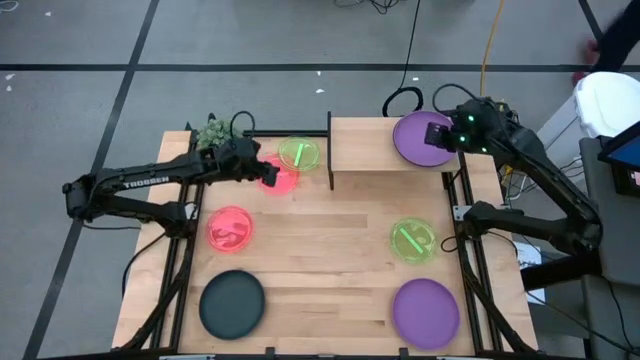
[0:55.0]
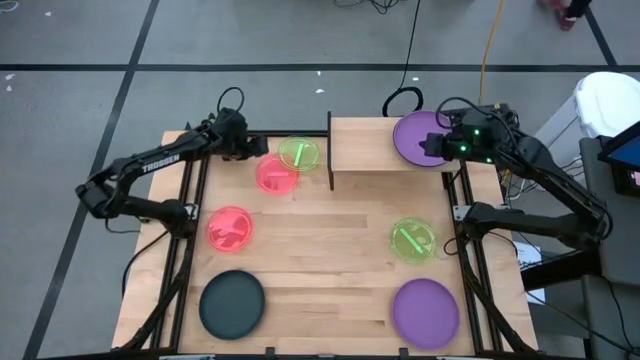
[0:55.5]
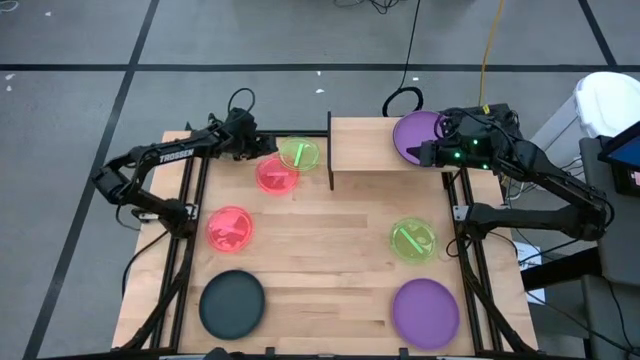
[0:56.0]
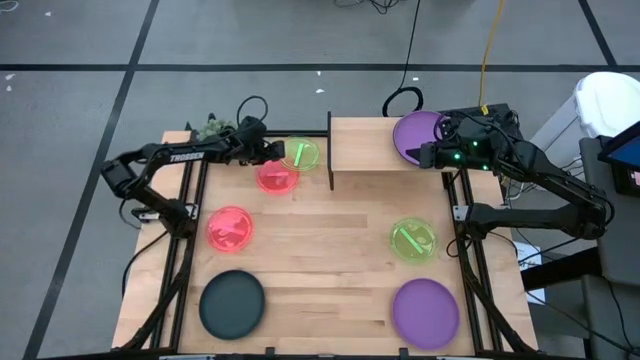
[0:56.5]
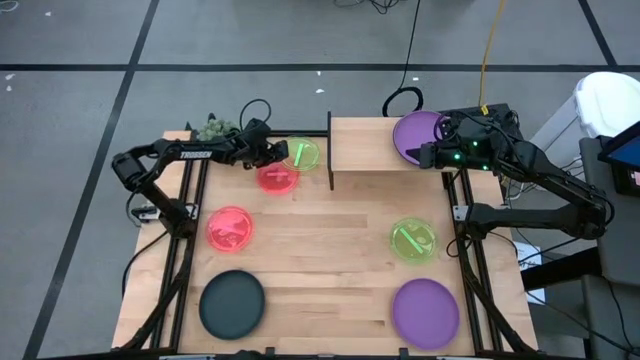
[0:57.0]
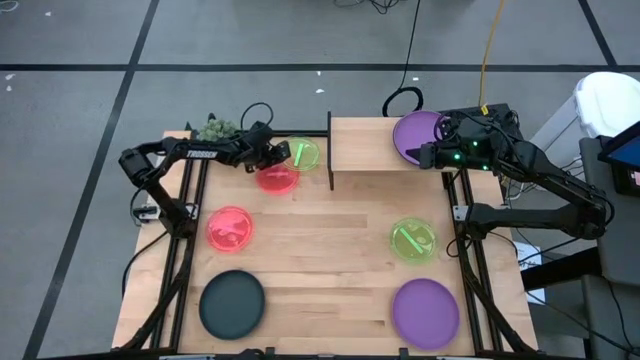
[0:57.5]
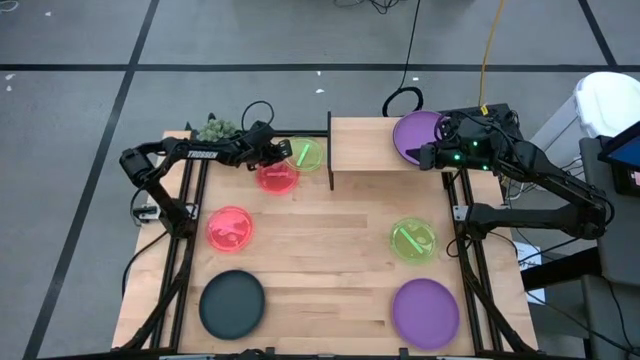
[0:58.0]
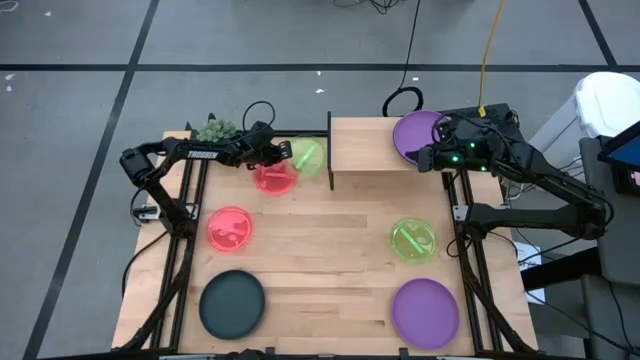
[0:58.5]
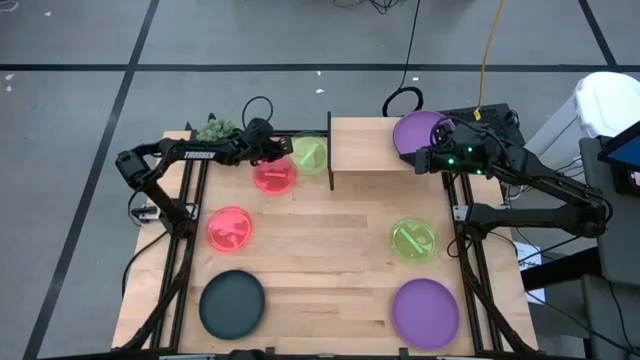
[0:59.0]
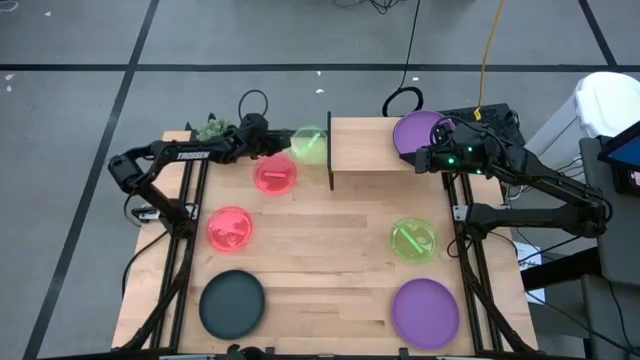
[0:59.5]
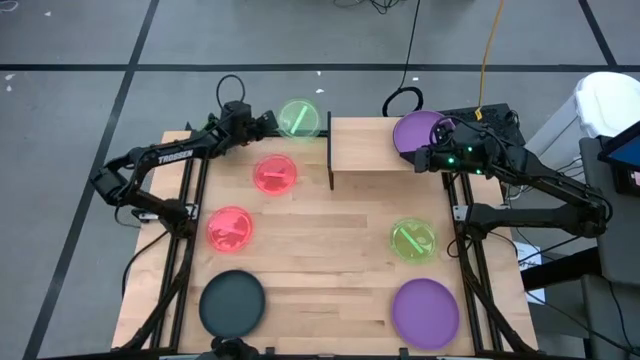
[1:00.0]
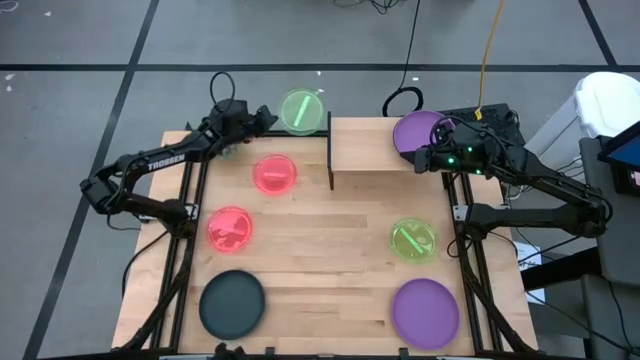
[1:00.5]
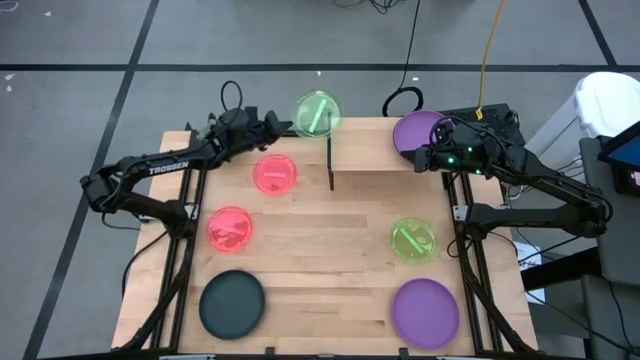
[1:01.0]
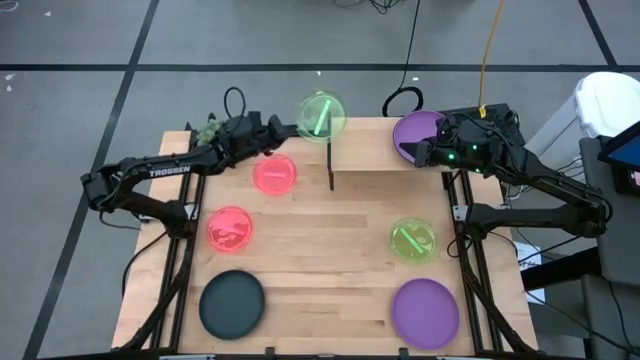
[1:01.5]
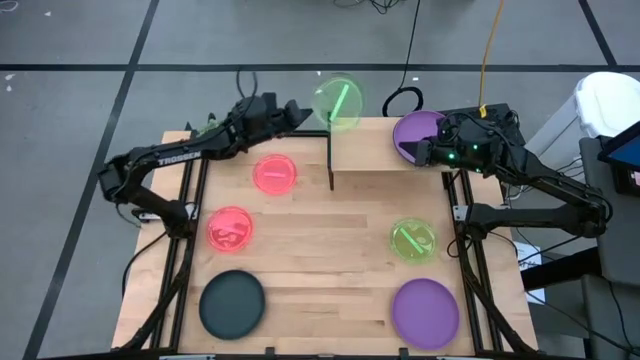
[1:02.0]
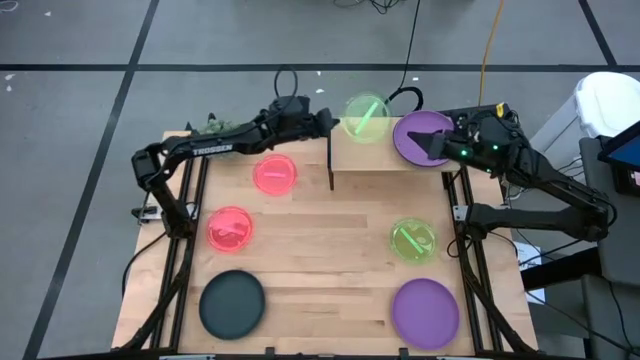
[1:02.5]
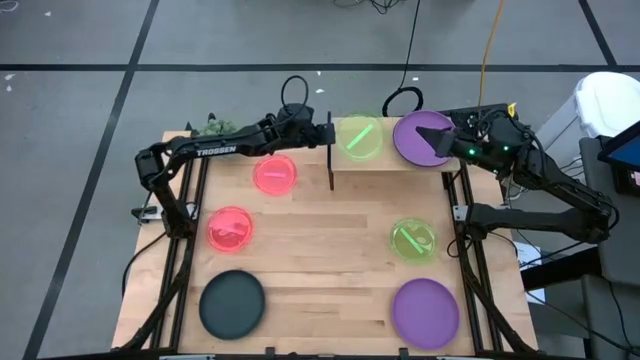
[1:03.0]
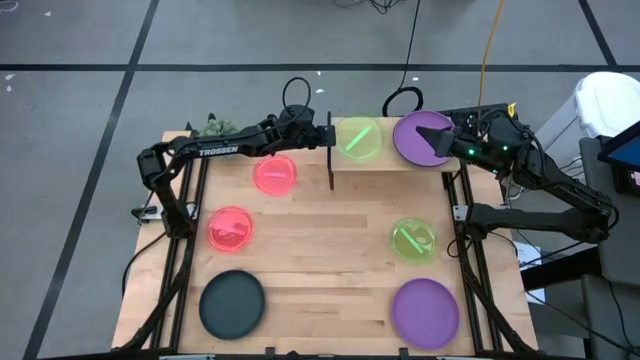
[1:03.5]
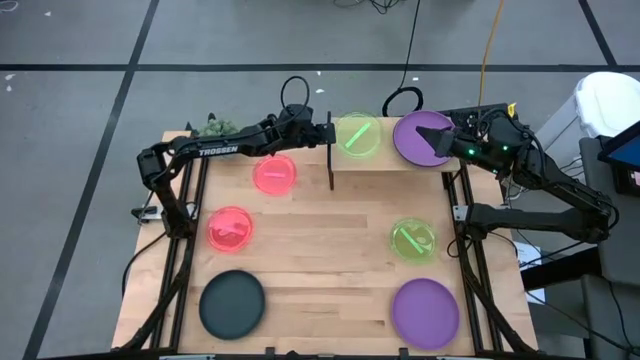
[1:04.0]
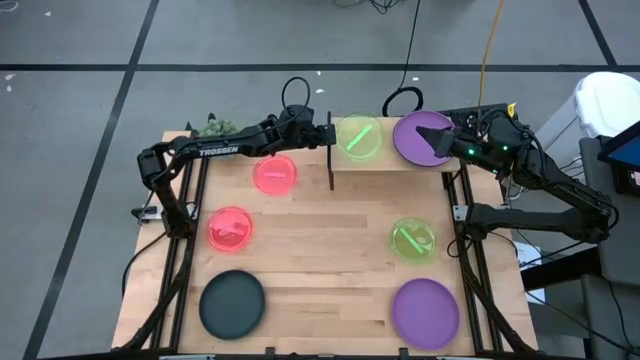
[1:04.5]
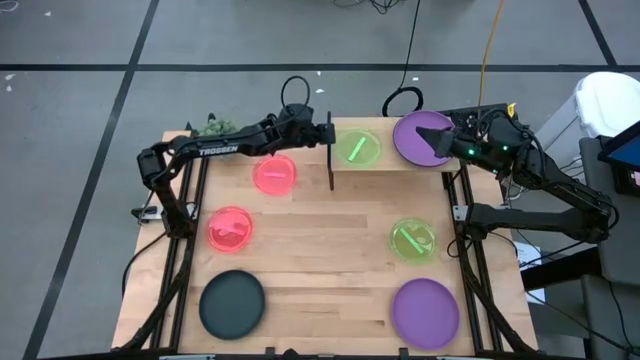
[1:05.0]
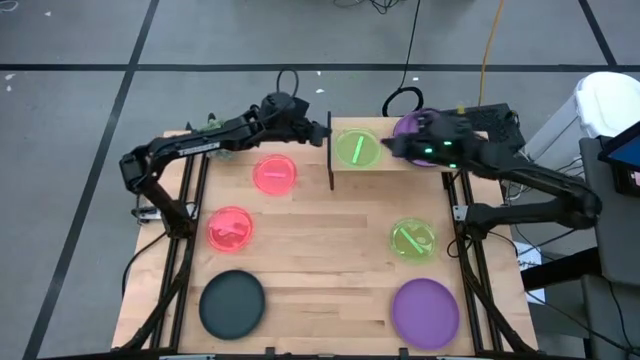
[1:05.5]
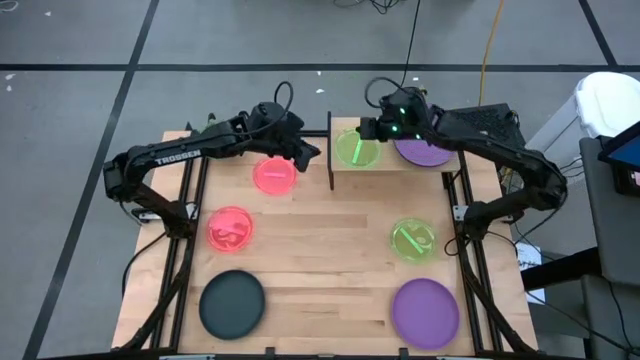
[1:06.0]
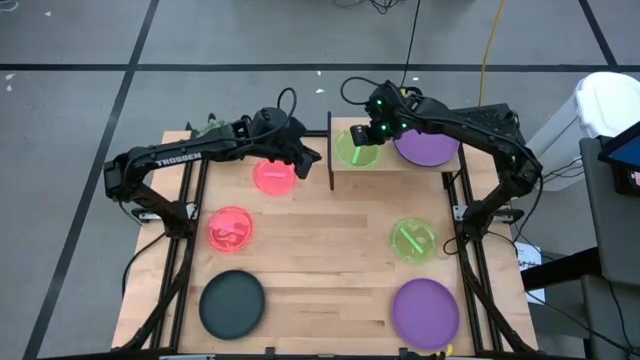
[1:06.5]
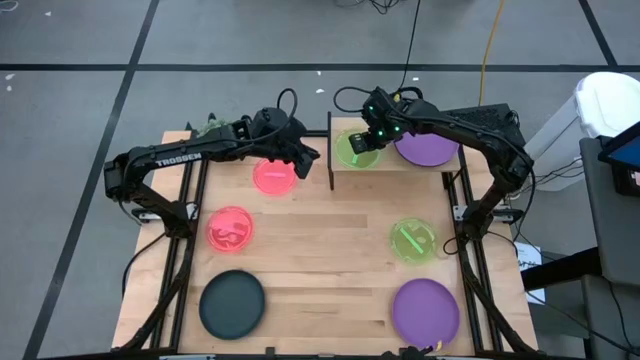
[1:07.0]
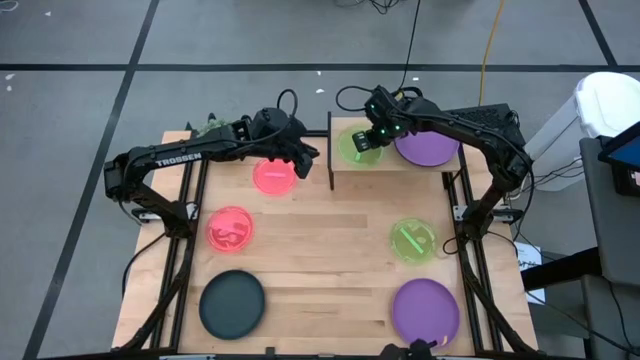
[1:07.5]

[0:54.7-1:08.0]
Task: Place and stack plates onto a shelf
Put the left green plate on the shelf

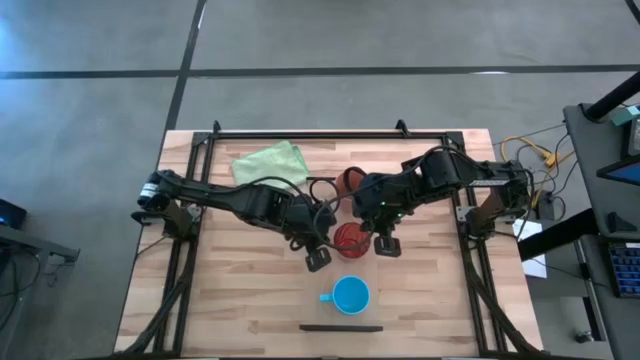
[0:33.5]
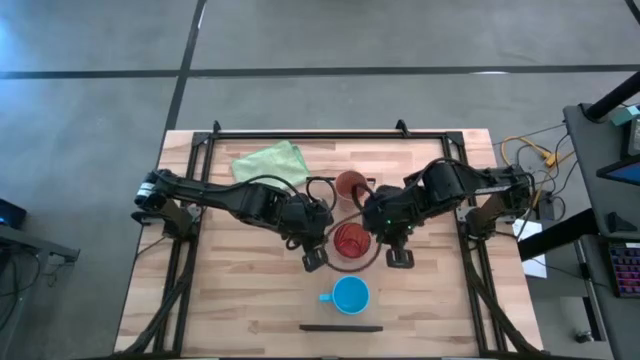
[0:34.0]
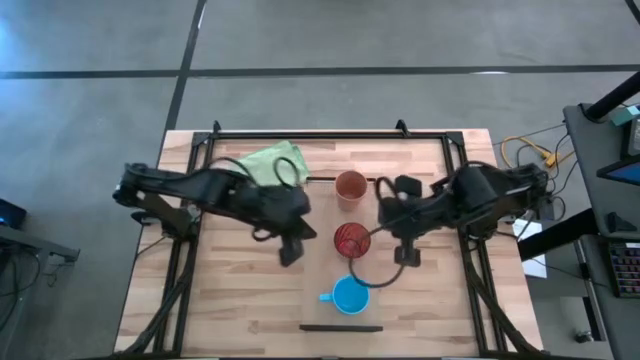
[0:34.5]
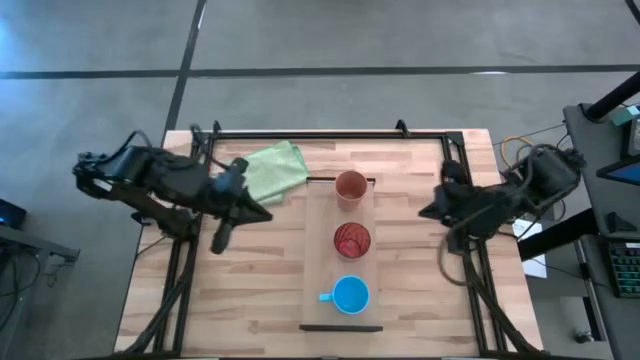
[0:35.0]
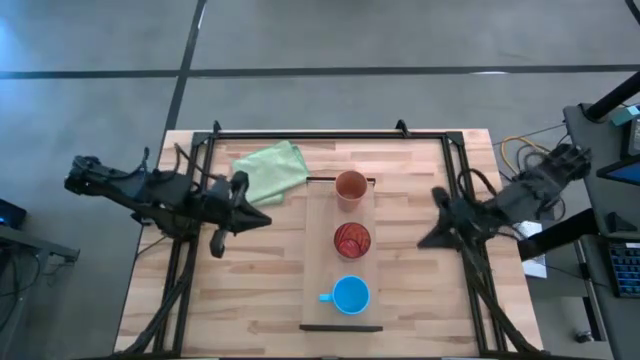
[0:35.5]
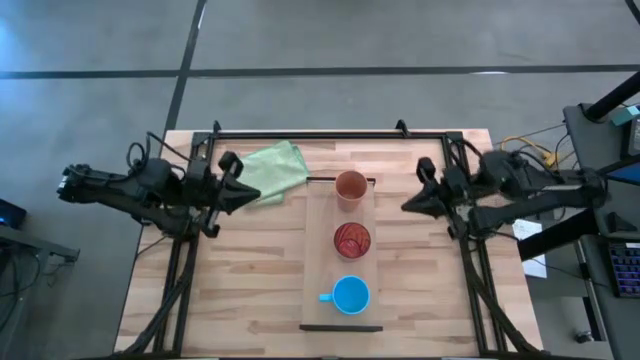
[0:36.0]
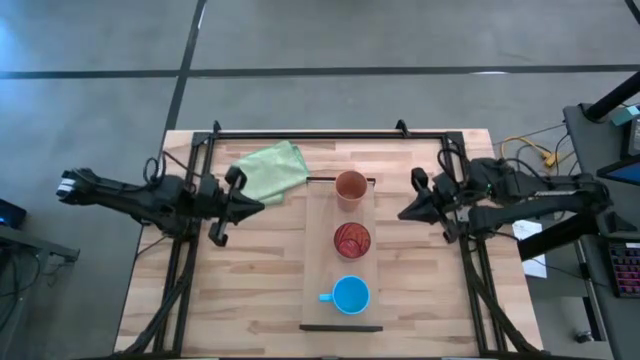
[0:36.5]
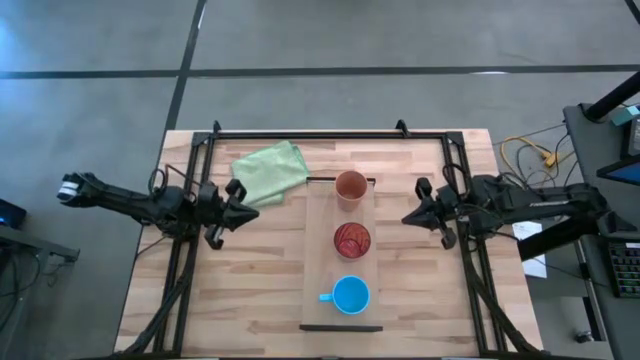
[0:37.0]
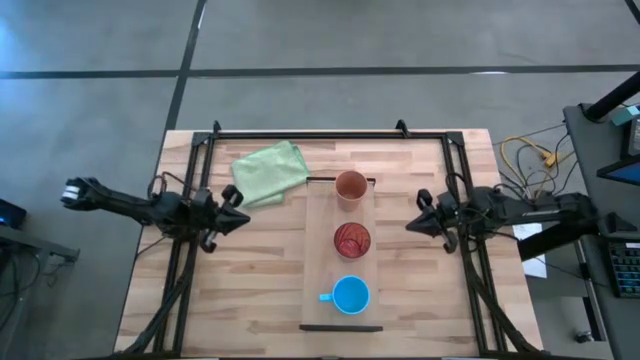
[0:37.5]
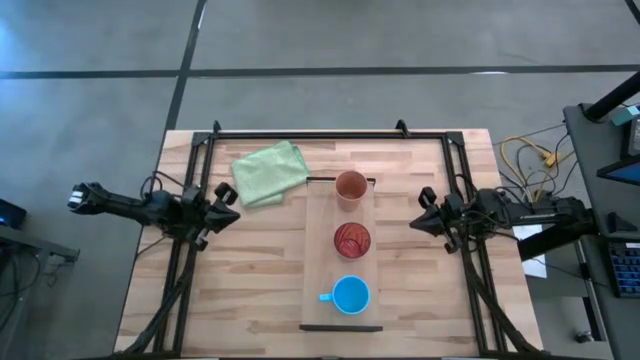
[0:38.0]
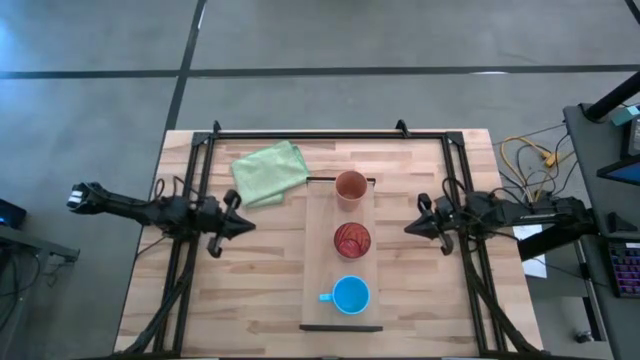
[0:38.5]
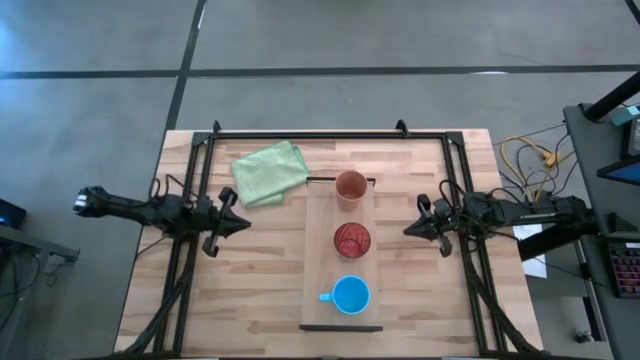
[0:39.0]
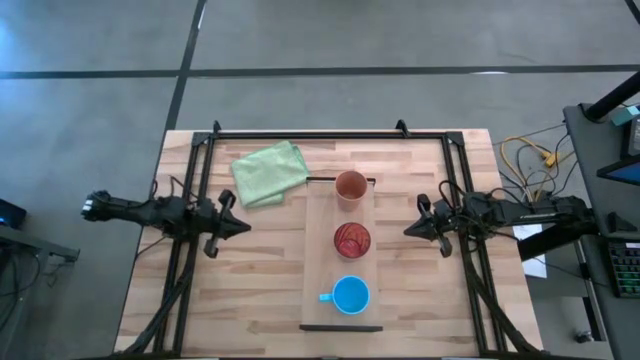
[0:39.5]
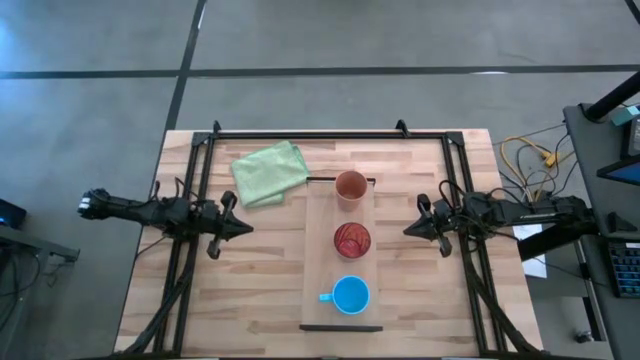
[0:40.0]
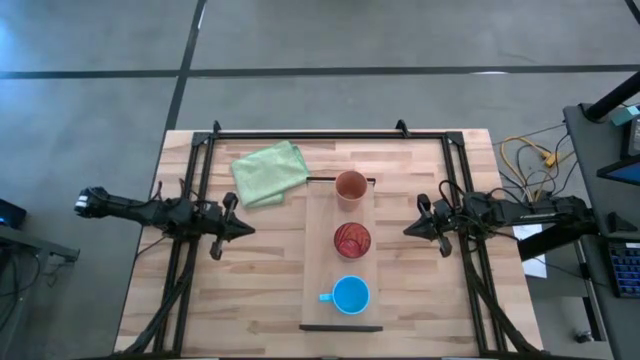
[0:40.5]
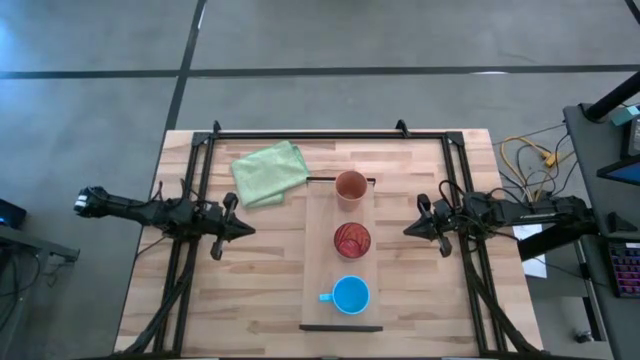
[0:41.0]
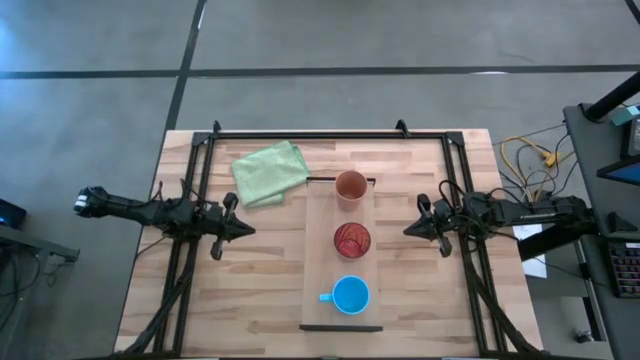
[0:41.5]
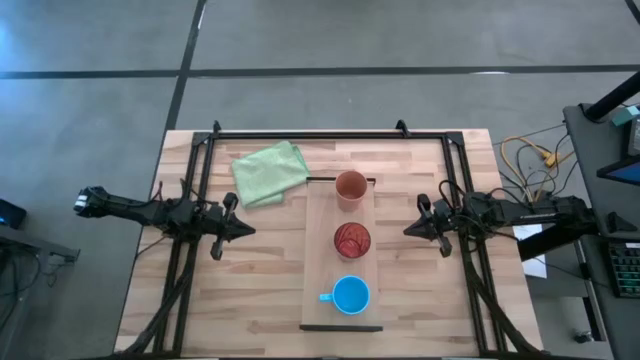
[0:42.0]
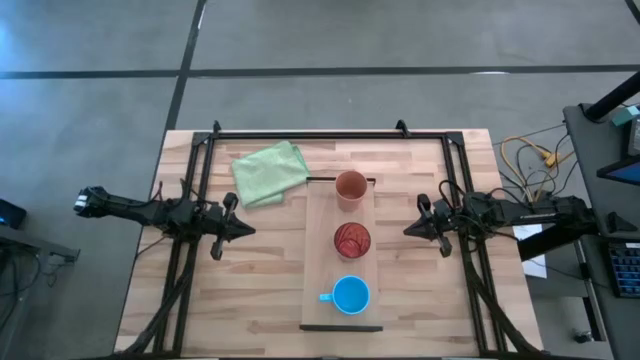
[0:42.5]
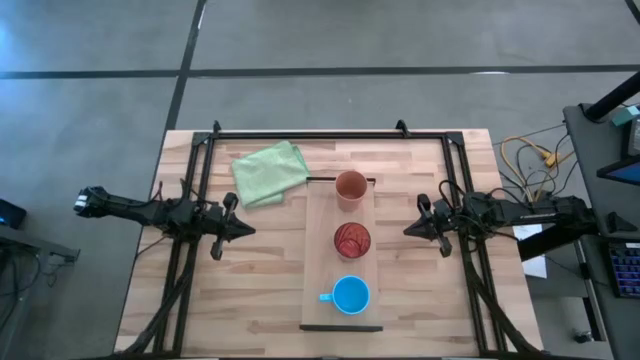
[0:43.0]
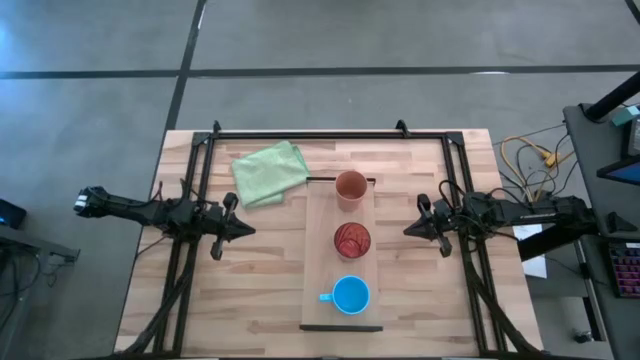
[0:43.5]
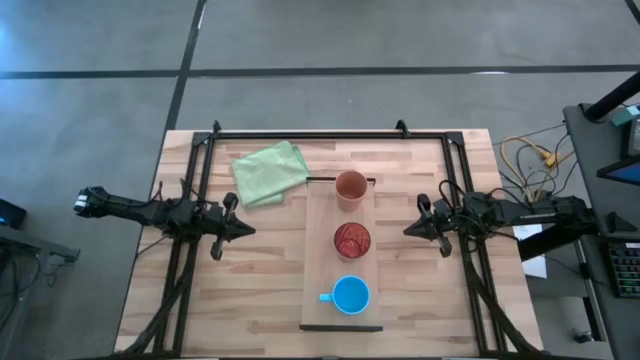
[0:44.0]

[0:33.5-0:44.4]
Task: Stack small to large cups/mugs on shelf
Return to Home Position
